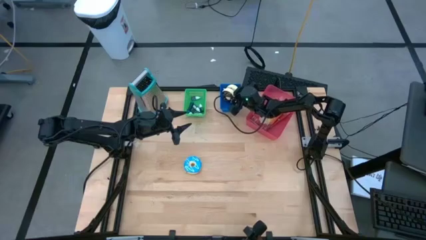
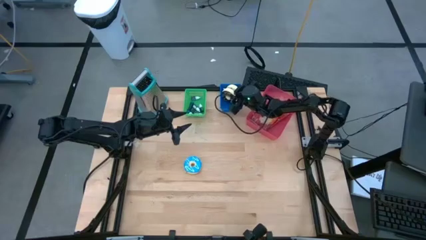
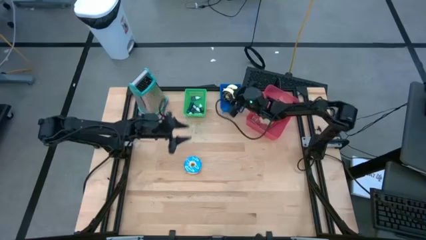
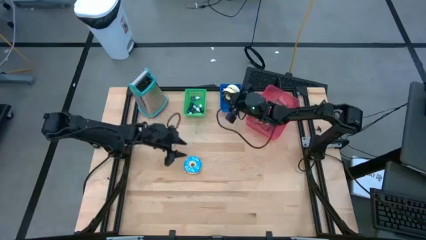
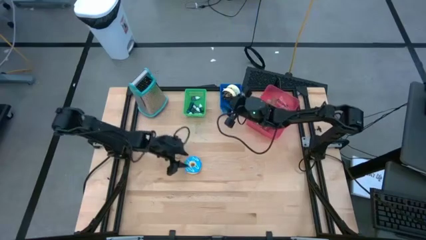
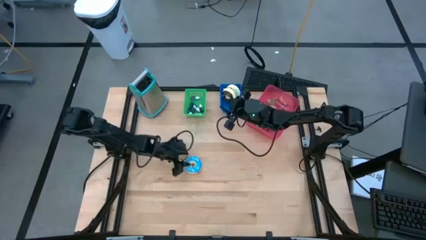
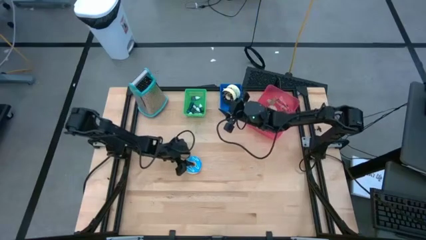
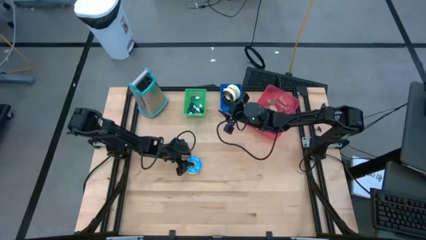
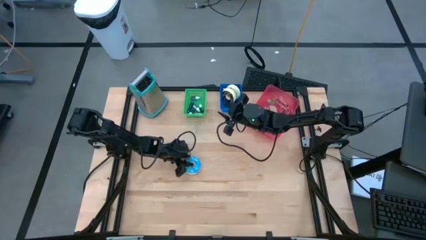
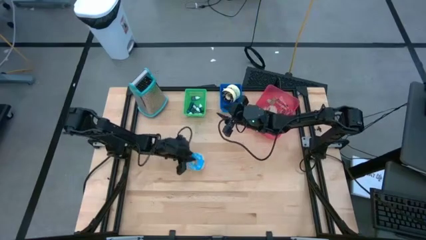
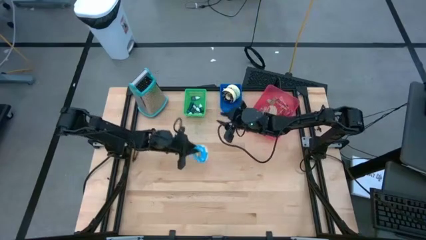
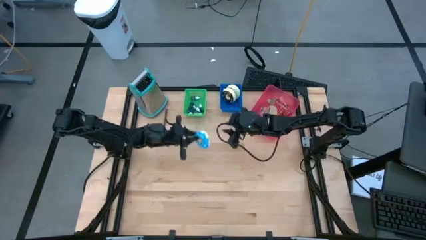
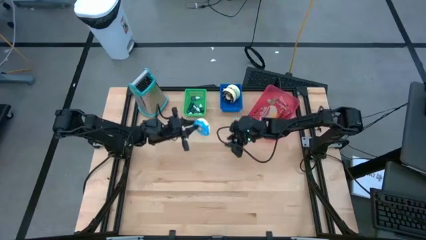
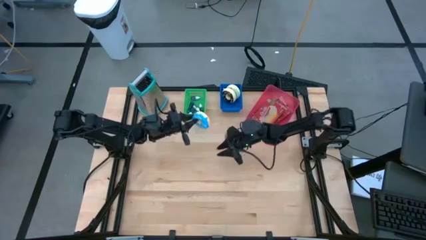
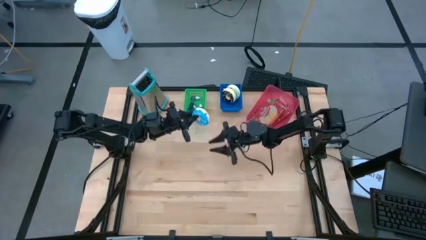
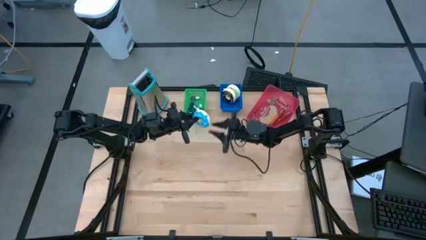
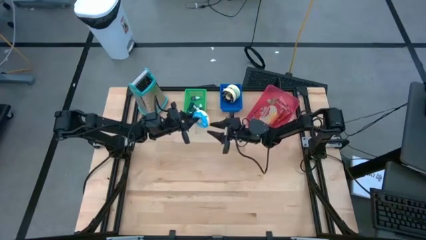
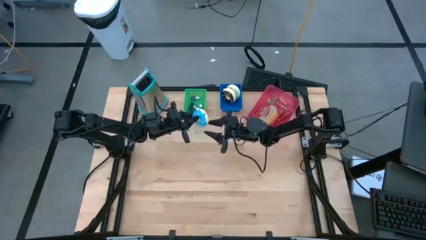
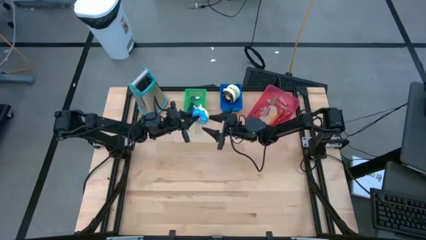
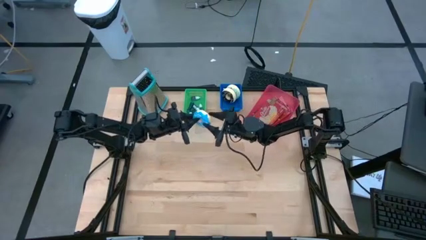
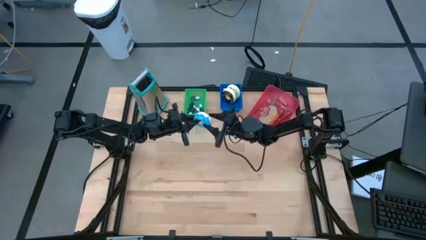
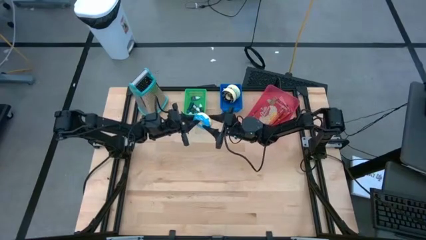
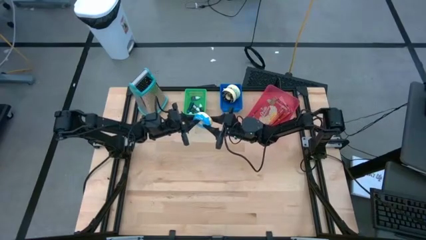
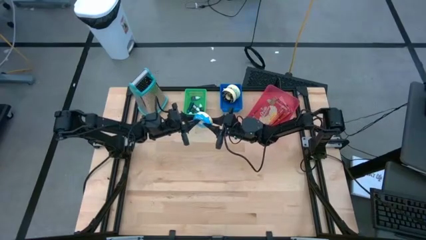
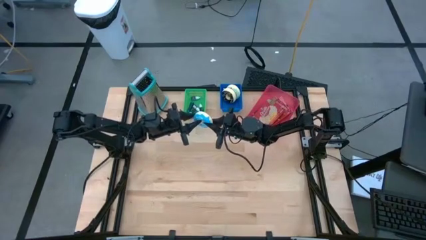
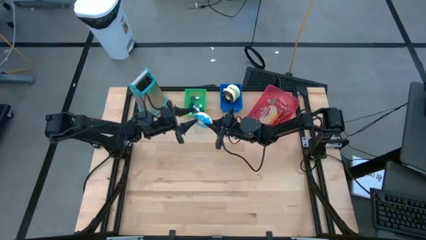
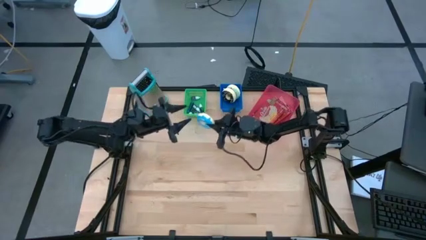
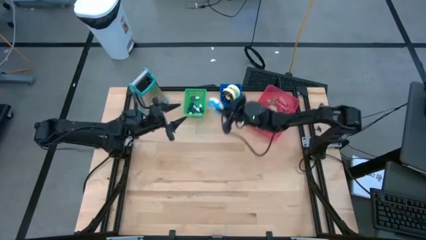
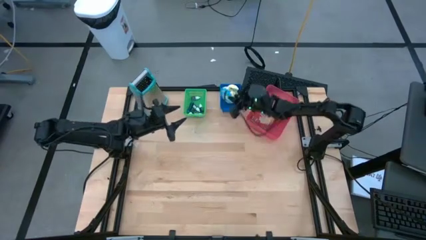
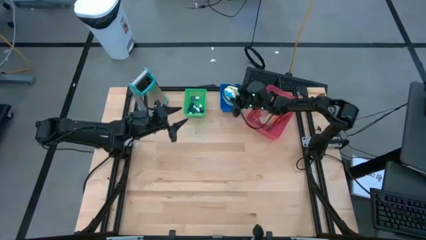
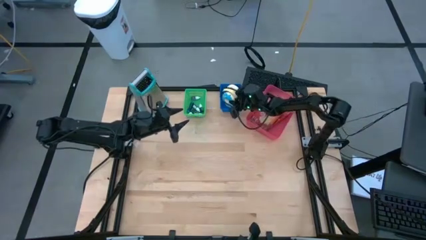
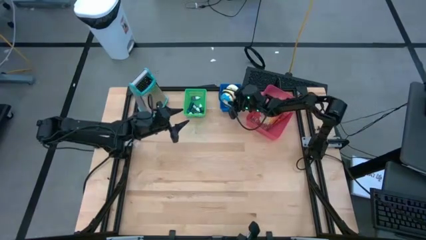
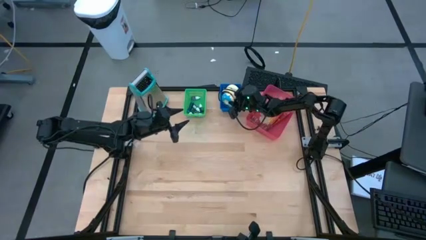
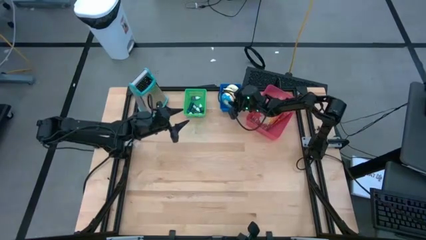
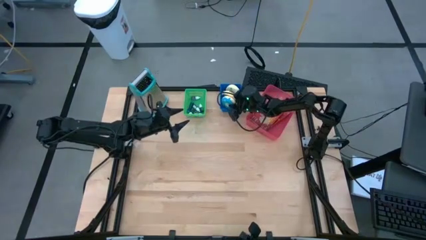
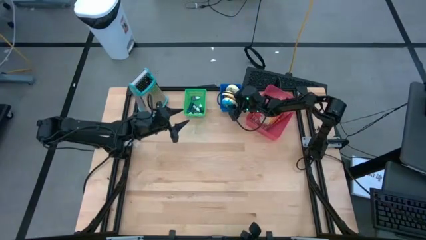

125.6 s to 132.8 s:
Put the blue donut into the blue bin

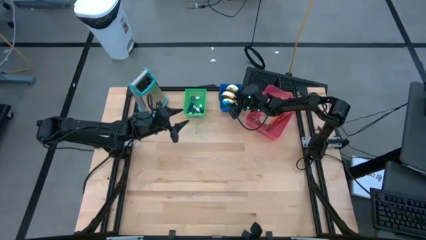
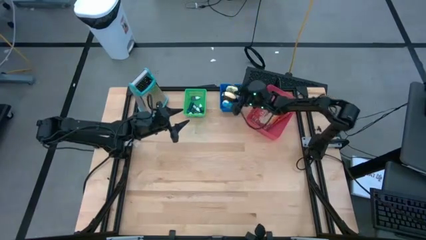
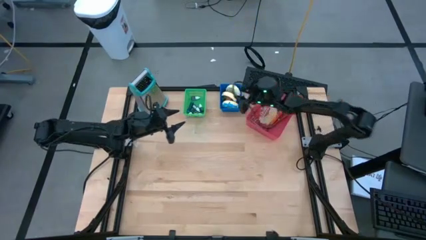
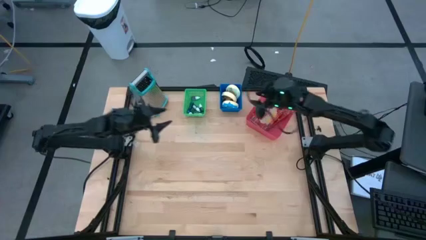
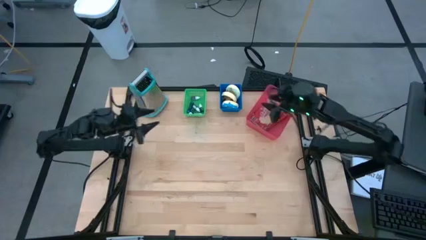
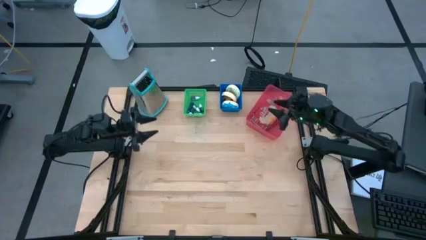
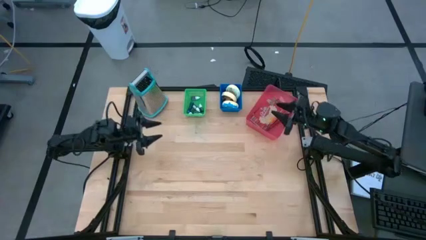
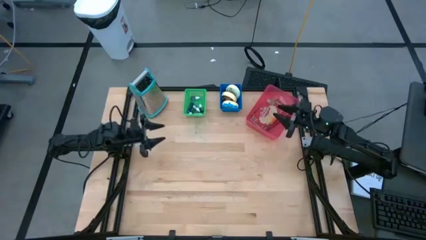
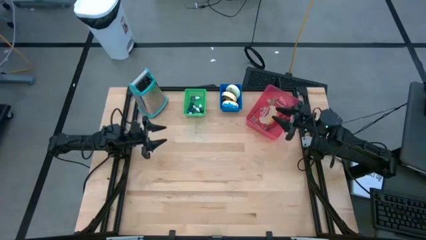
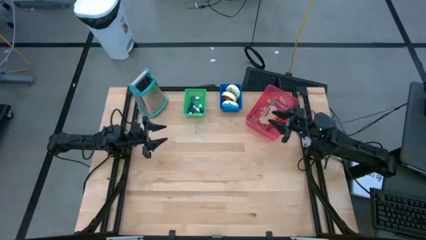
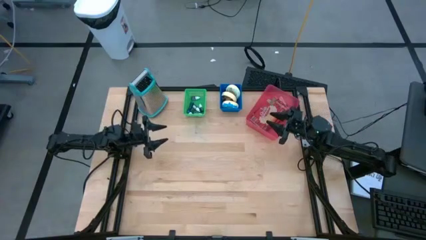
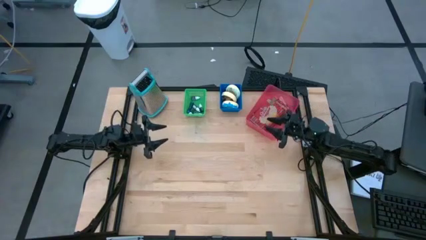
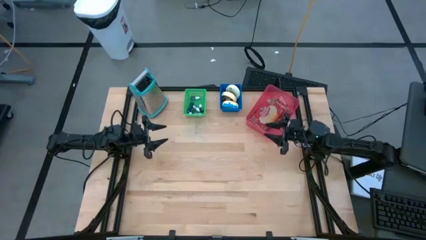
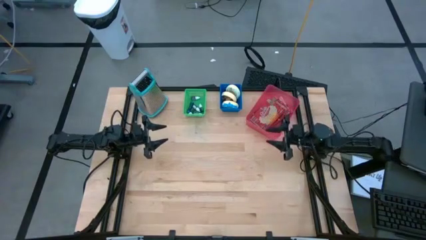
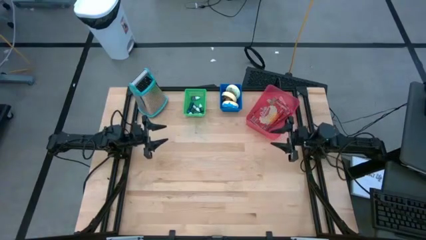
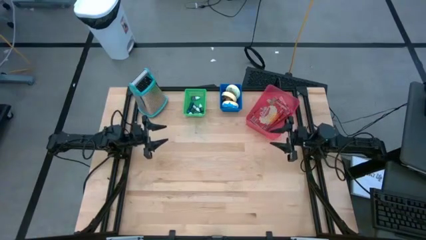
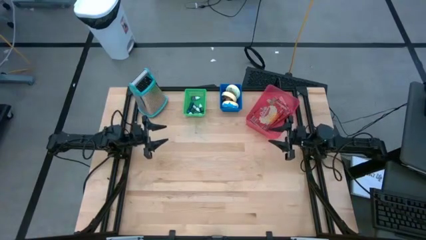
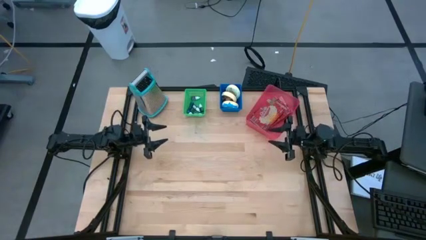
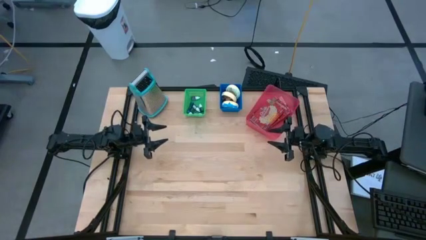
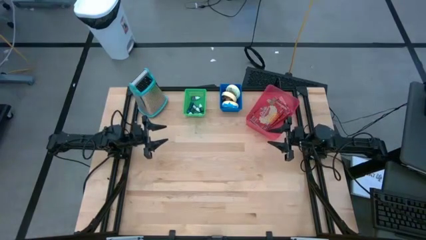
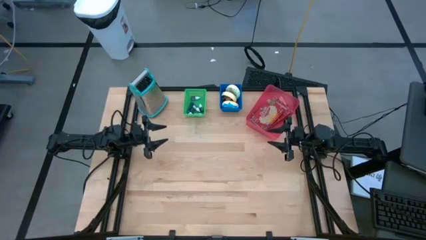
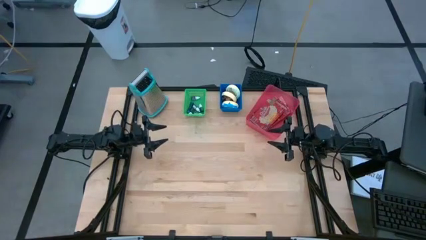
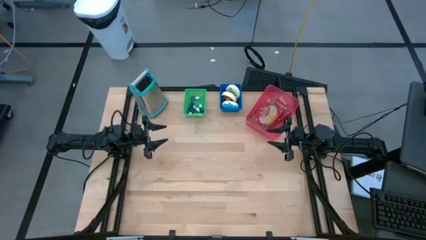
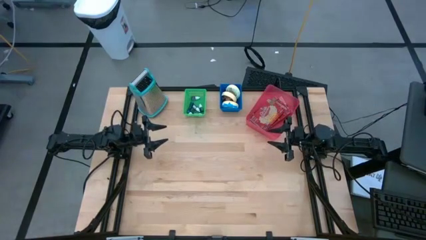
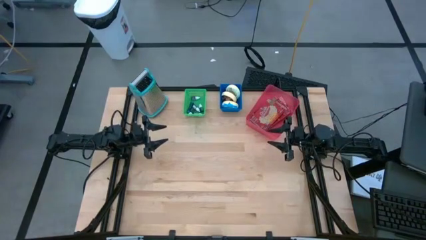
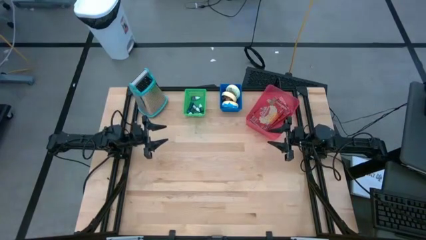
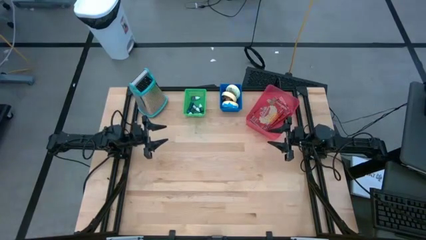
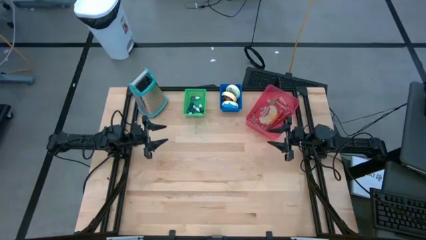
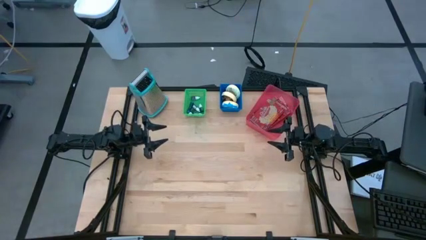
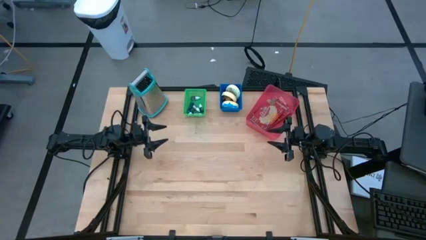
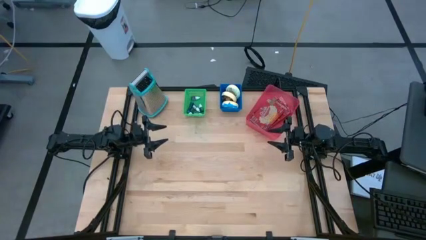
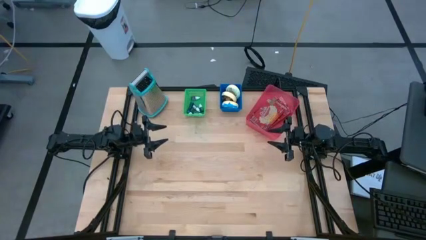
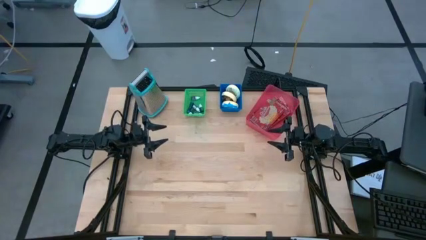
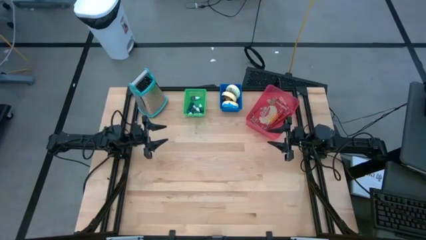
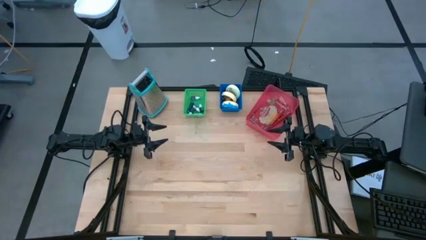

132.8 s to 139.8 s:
Return to Home Position
